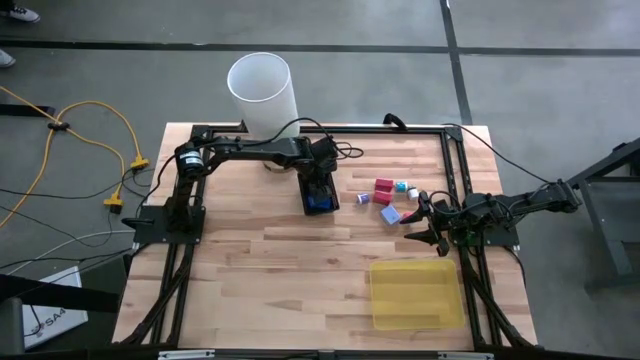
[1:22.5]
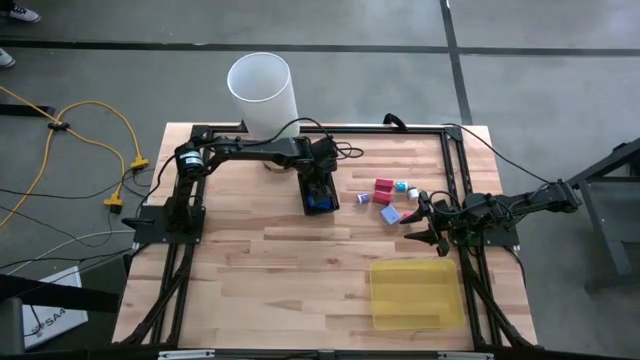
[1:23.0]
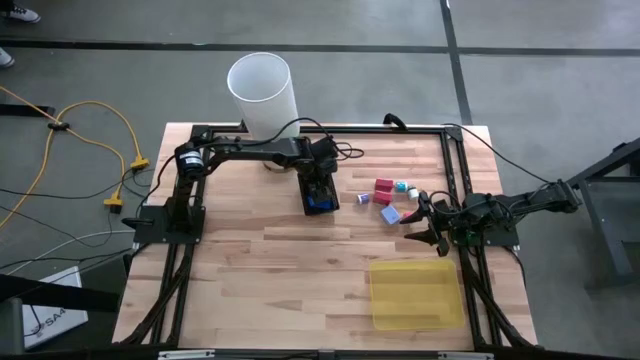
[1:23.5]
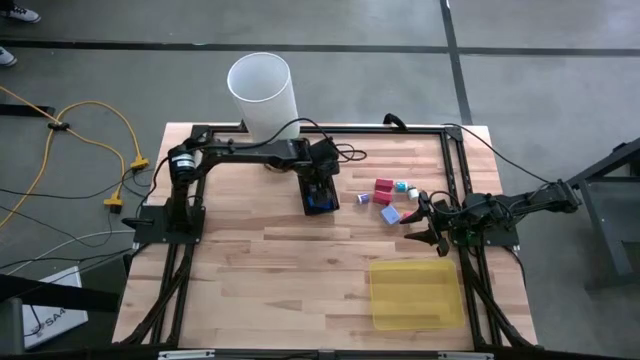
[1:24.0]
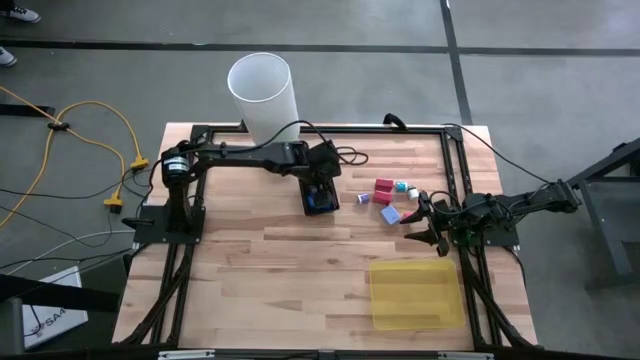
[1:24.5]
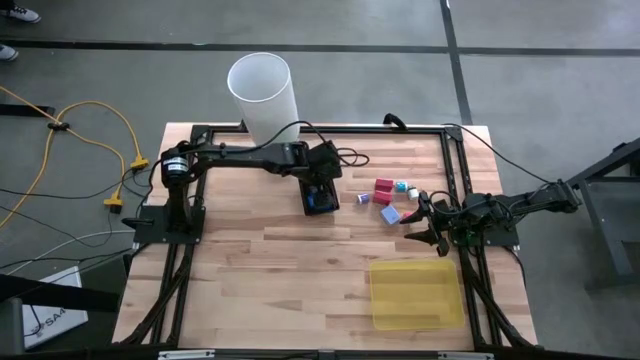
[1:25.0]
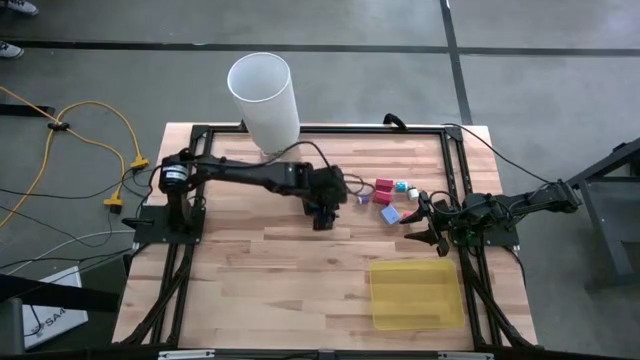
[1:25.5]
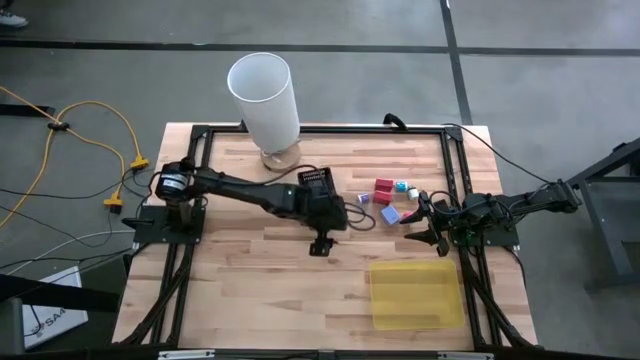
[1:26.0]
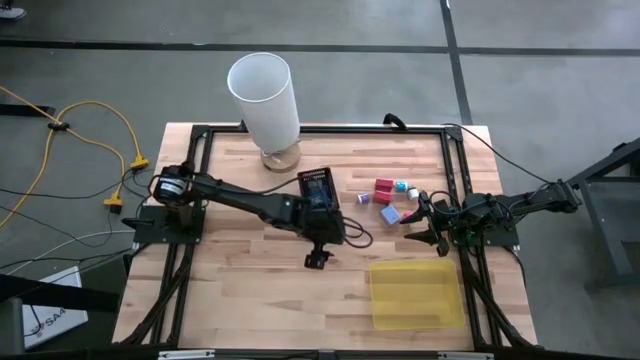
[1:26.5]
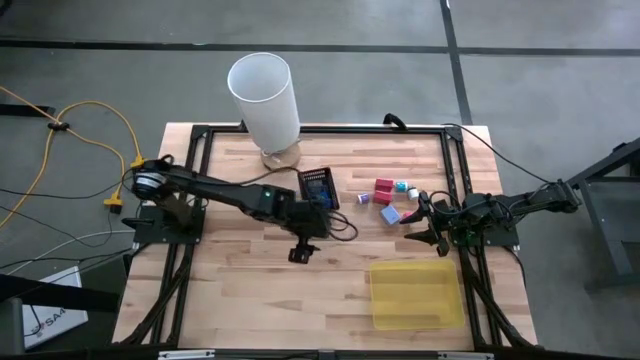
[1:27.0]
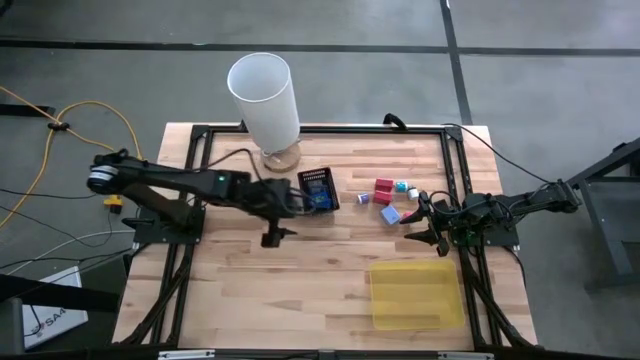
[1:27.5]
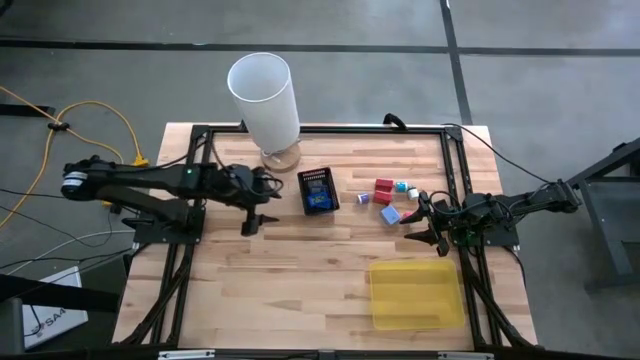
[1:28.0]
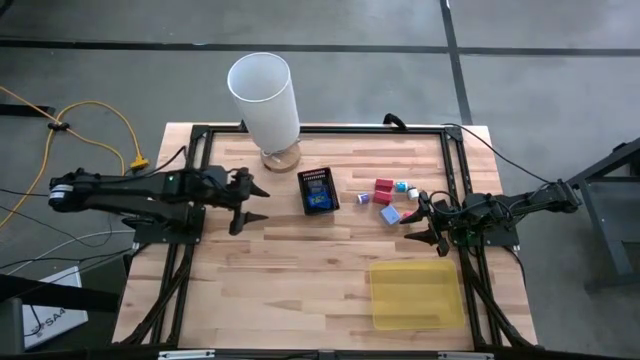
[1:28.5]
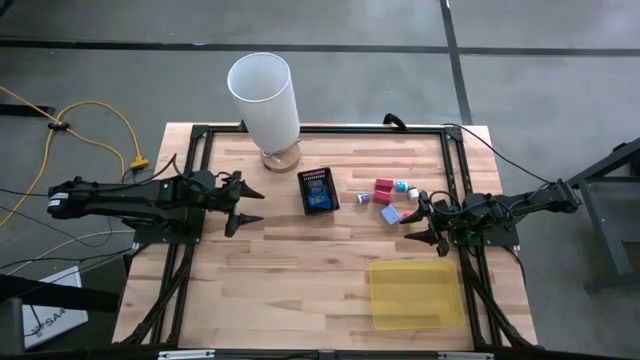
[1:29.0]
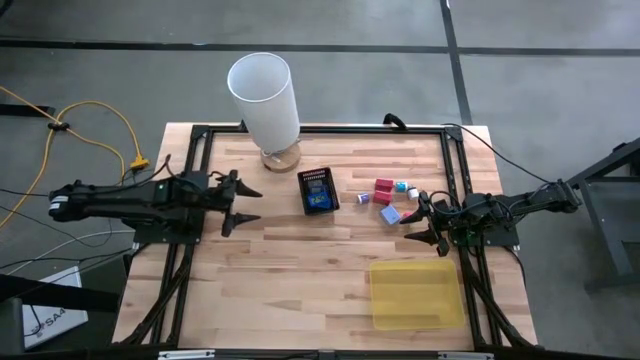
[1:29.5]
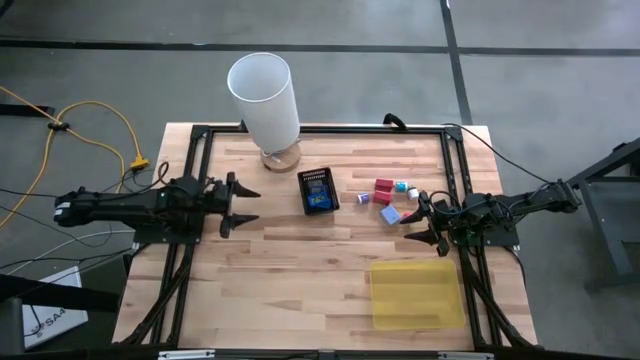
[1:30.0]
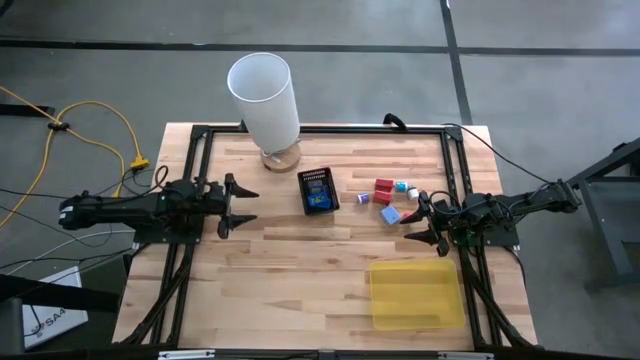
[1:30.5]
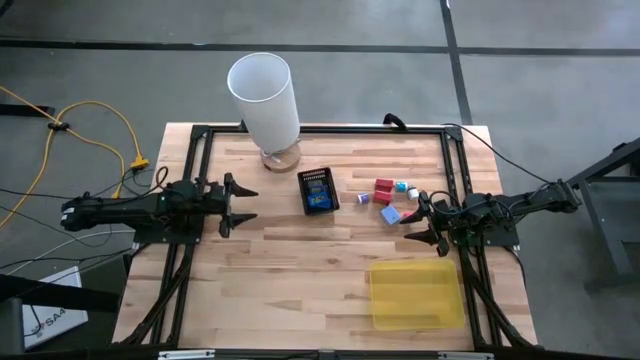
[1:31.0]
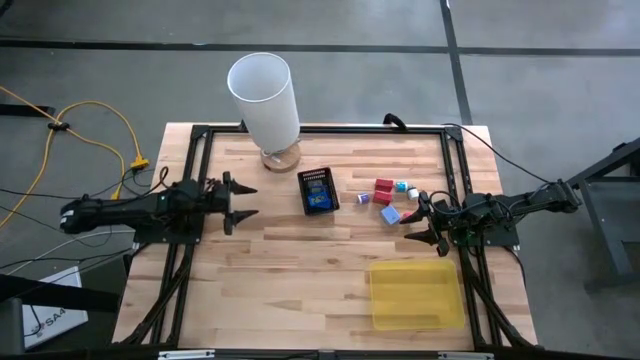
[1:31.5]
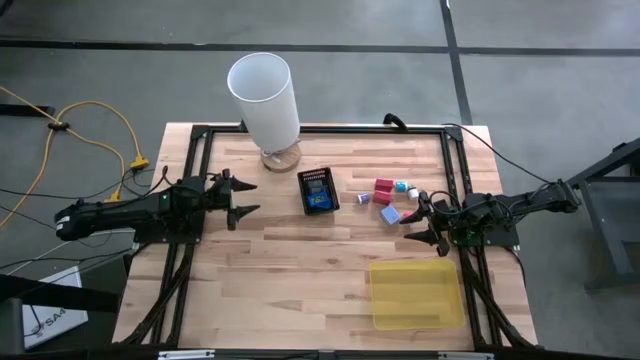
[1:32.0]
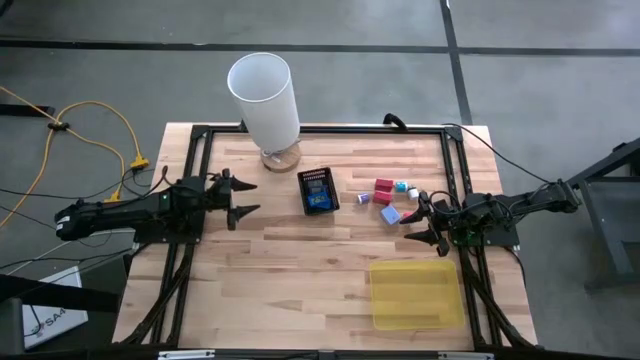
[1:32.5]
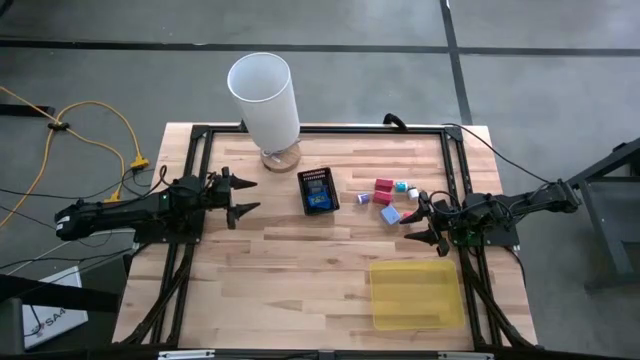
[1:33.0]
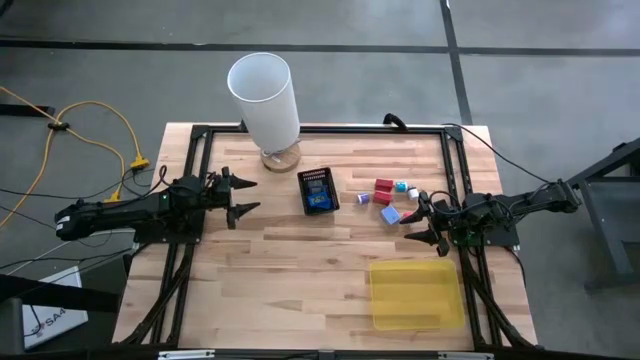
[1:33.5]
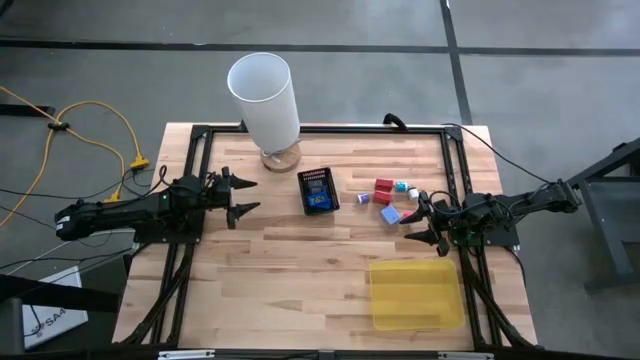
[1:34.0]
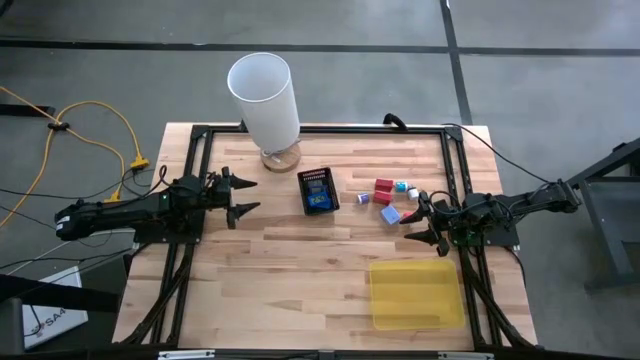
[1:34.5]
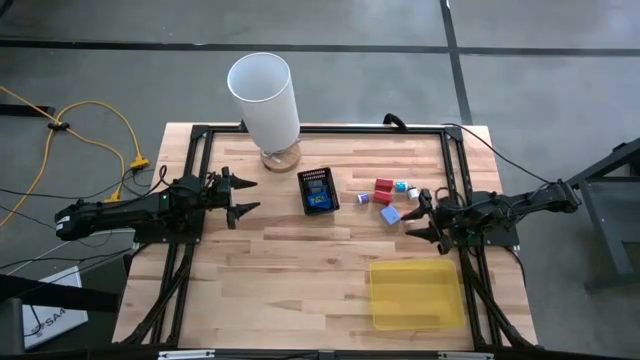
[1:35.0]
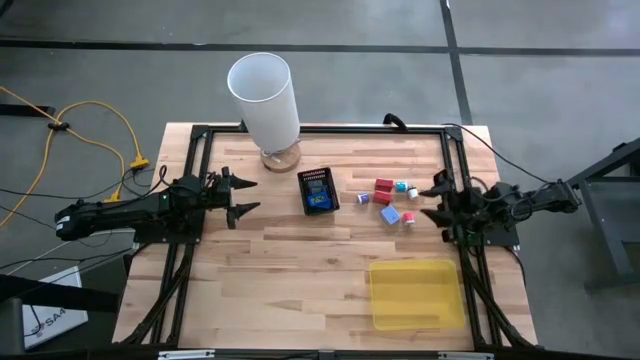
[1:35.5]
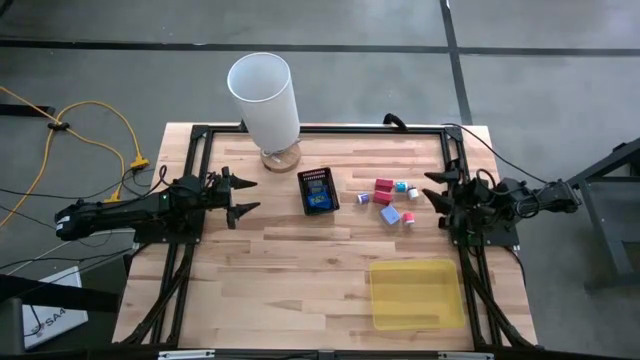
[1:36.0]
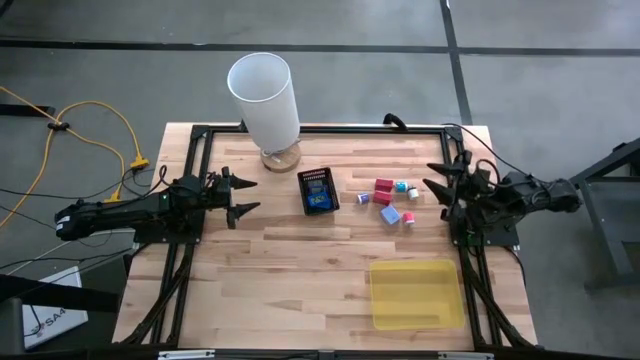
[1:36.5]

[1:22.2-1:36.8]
Task: Pick & Place Office items
Put the white charger adaptor into the yellow bin

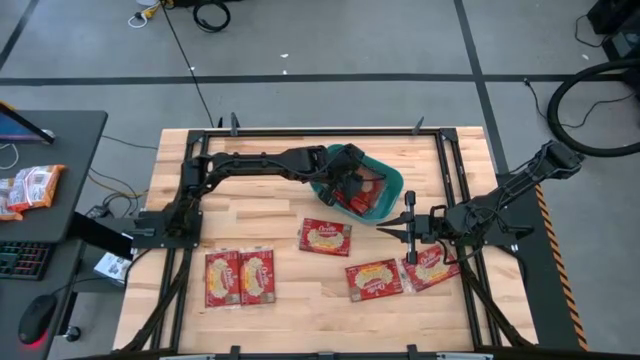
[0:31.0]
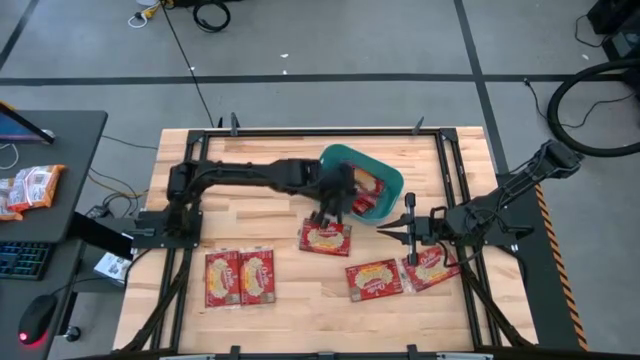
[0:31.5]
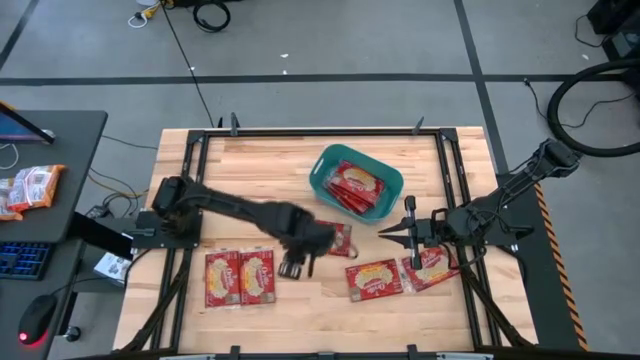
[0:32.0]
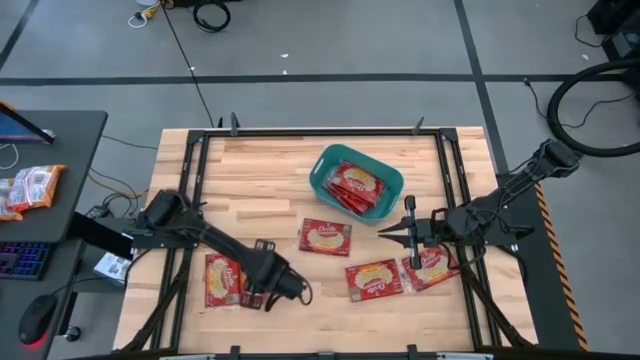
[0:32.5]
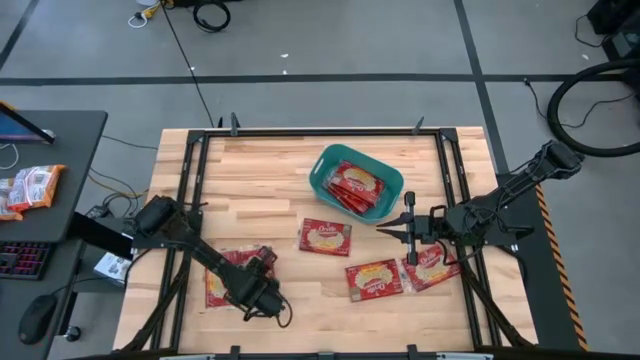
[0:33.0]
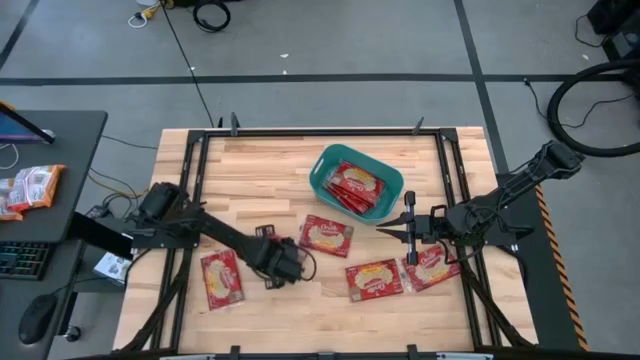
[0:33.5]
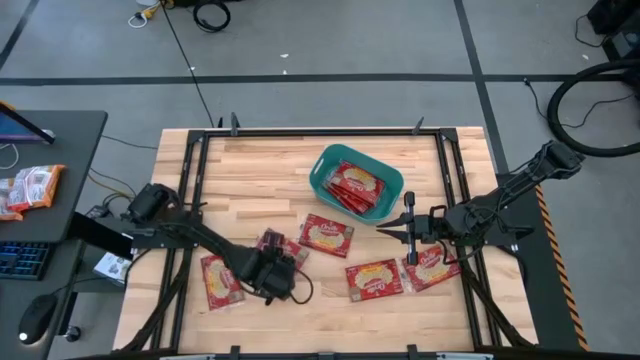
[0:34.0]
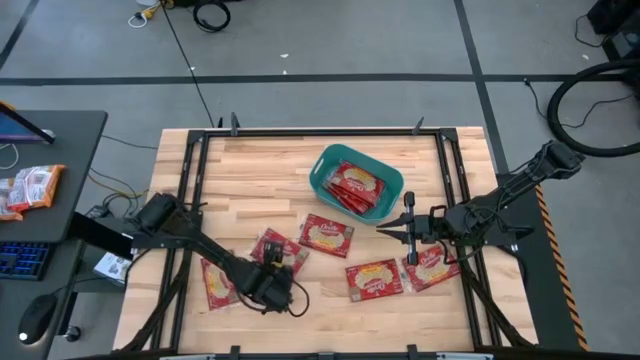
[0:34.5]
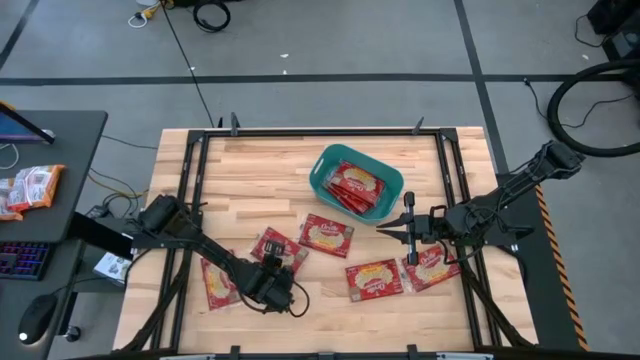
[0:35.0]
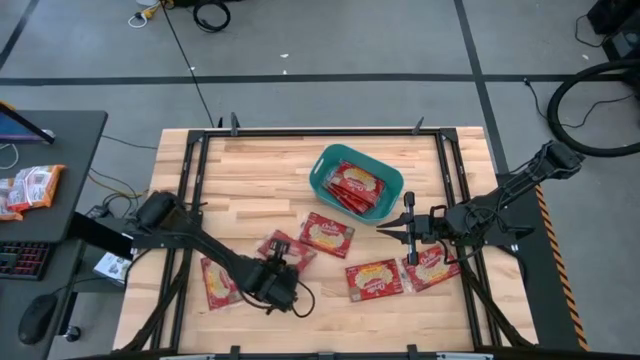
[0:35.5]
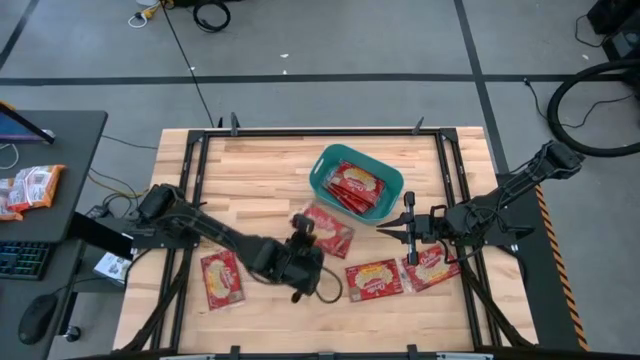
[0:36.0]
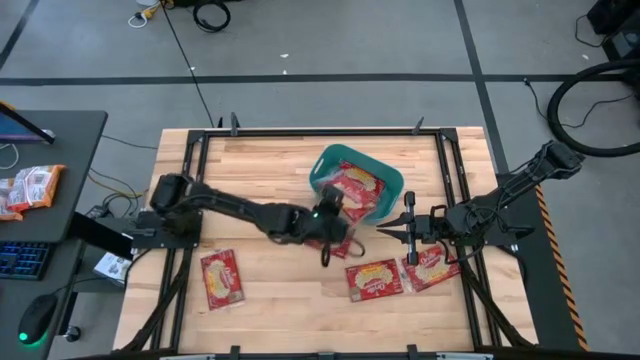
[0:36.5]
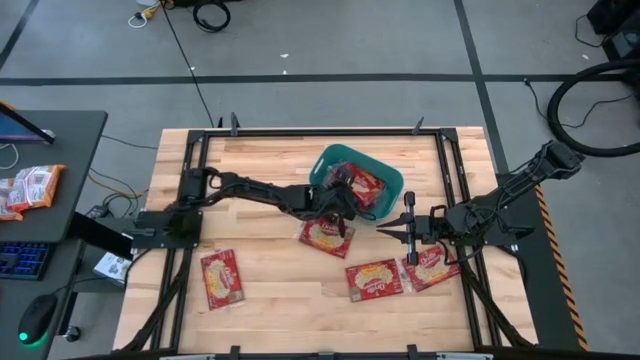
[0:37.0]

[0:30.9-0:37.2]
Task: Sort popcorn bags into baskets
Put the red popcorn bag into the green bin
